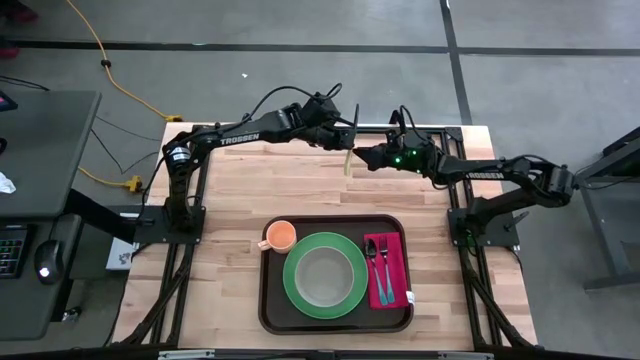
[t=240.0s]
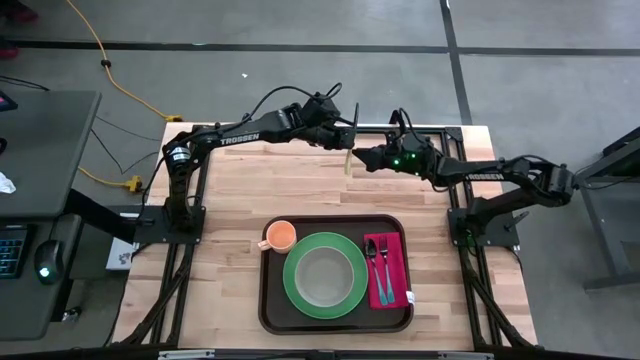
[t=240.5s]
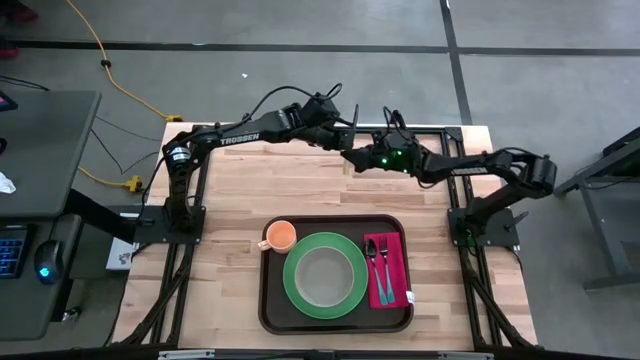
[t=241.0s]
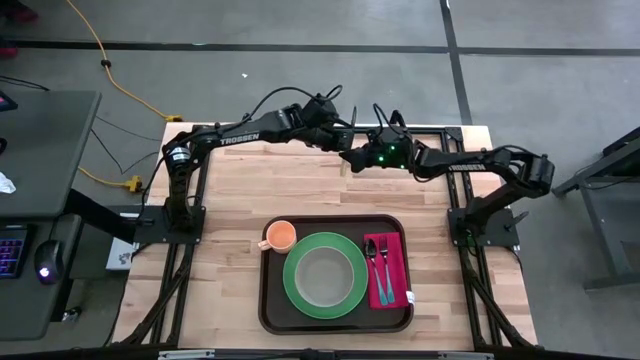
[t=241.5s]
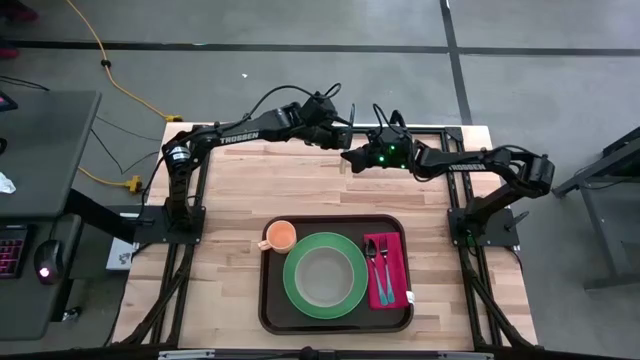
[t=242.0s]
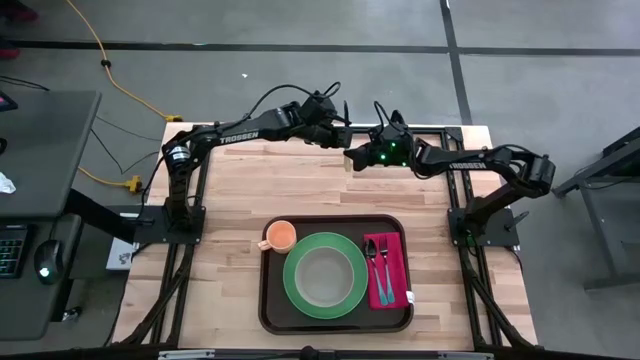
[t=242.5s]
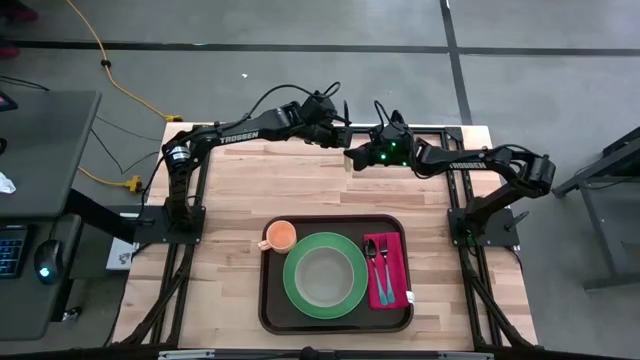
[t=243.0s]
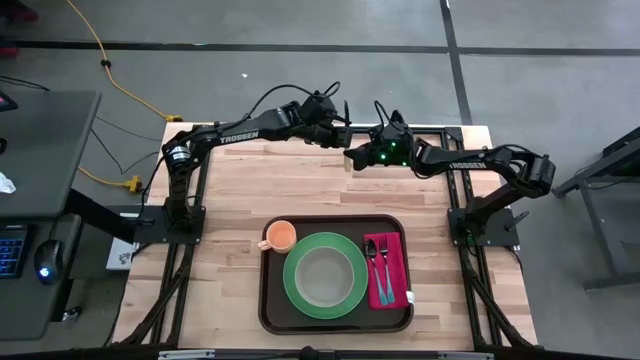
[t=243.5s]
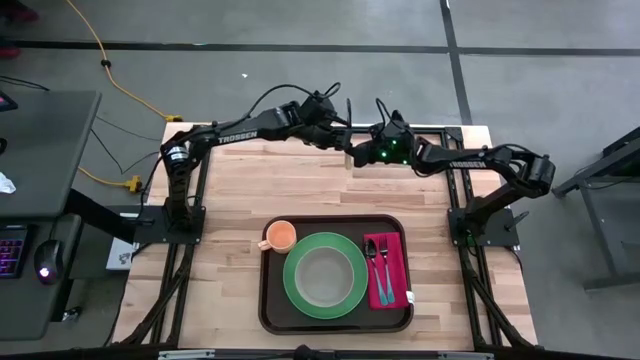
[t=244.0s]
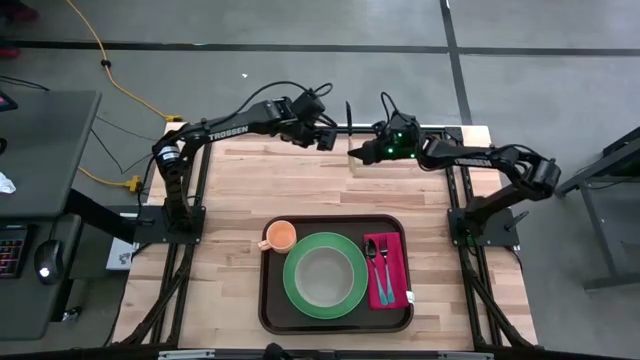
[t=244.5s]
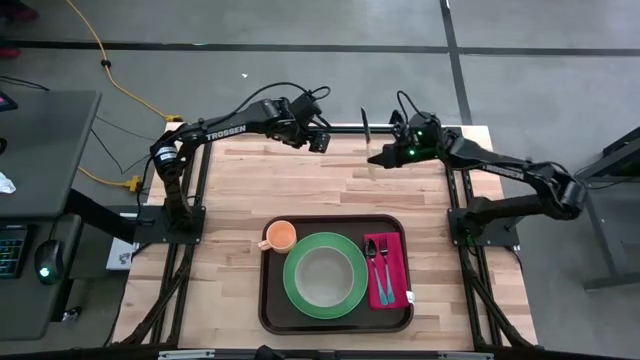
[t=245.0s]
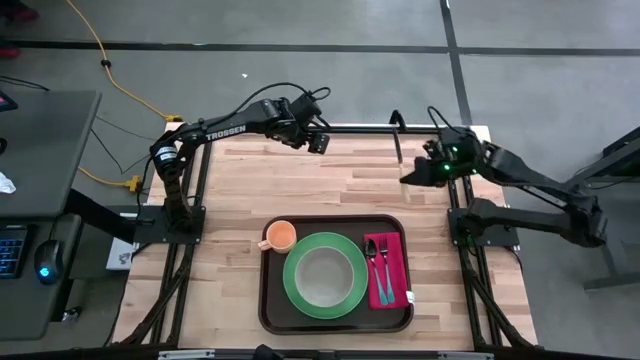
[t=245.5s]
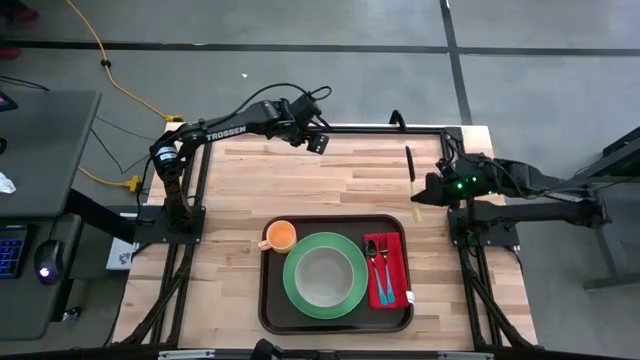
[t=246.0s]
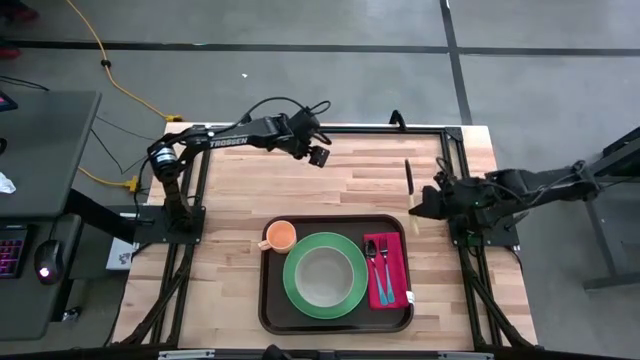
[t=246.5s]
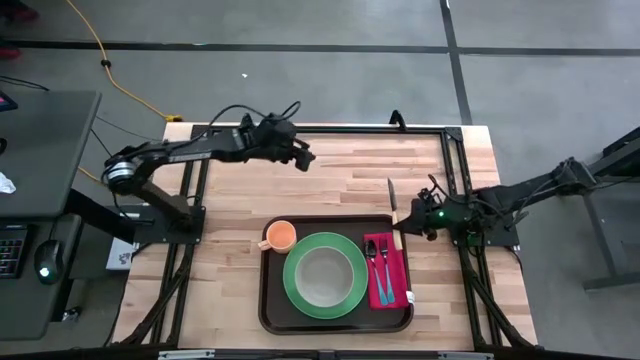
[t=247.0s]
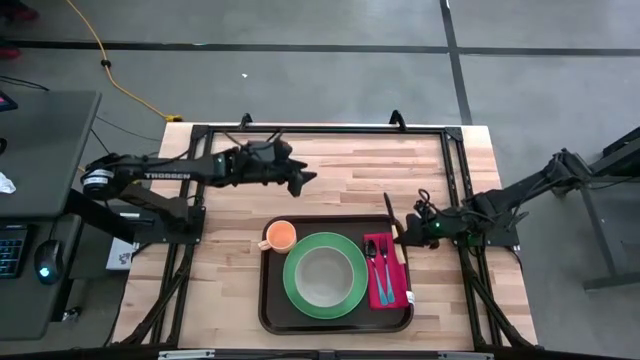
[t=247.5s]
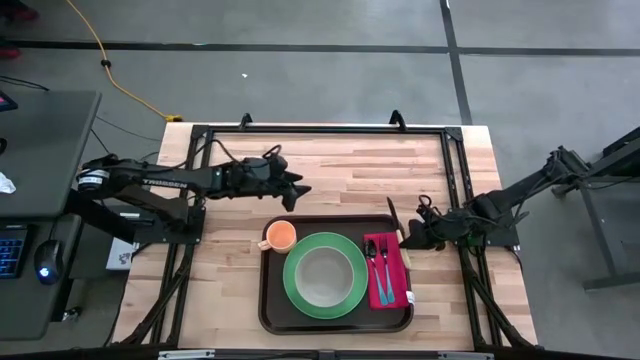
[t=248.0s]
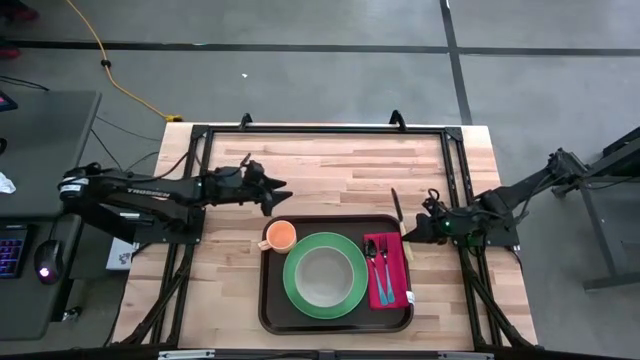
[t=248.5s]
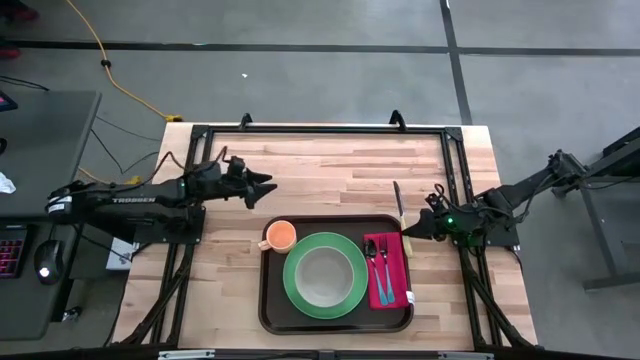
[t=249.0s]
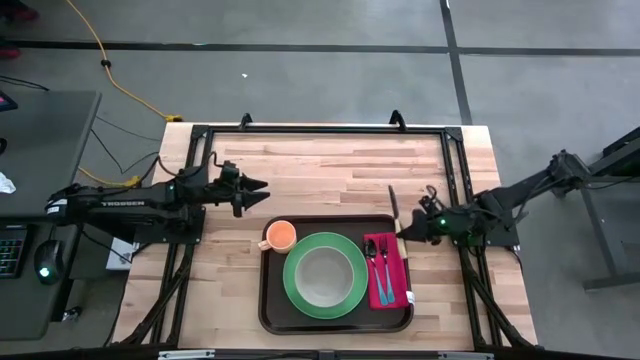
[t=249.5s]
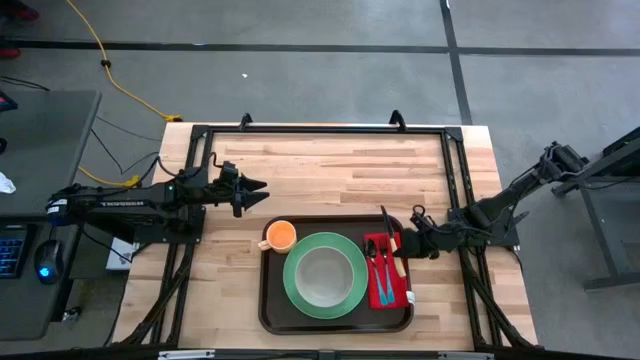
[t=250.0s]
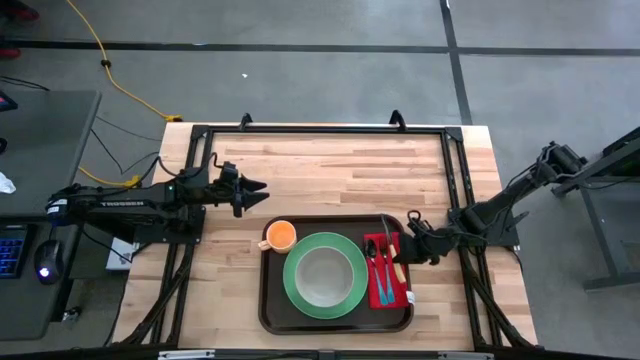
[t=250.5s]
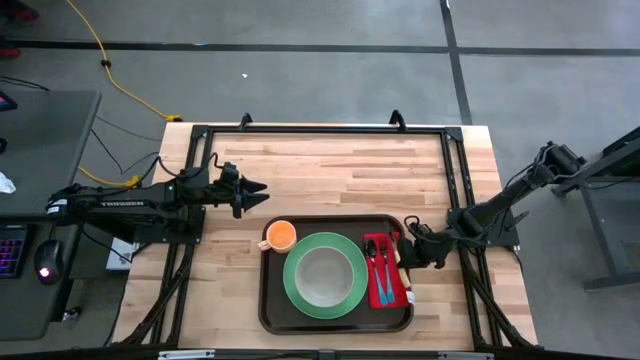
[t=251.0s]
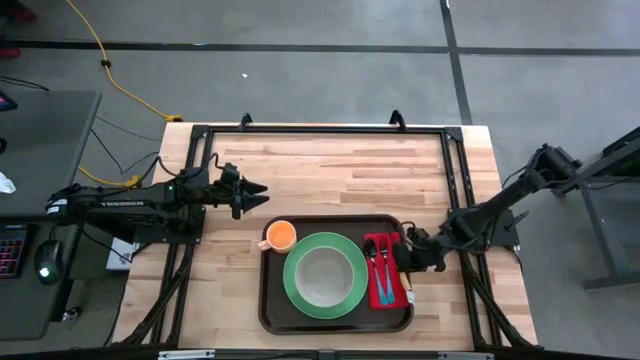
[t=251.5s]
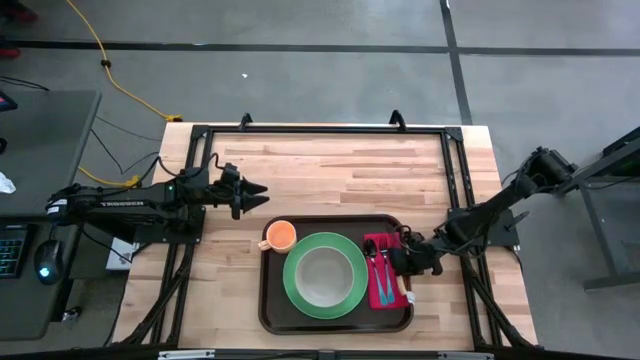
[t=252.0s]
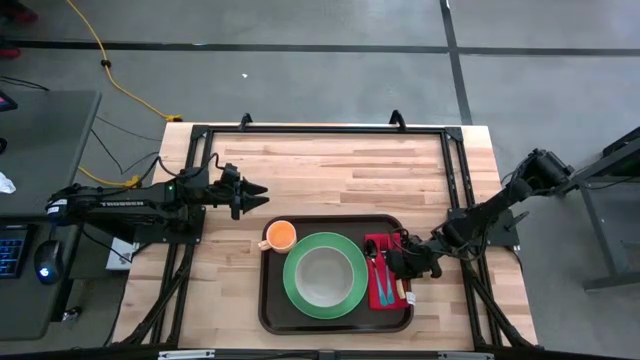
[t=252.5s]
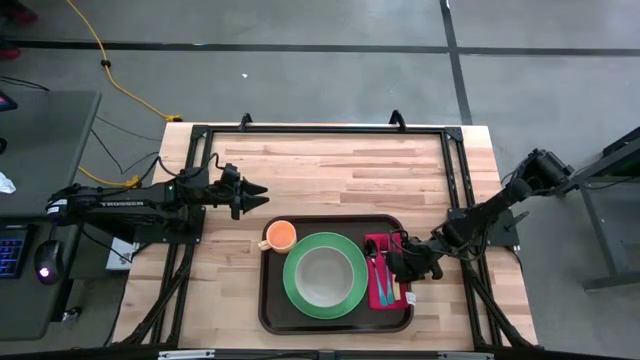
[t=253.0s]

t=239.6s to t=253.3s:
Task: Set up tray
Put the yellow table knife on top of the red napkin to the right of the blue fork on the black tray

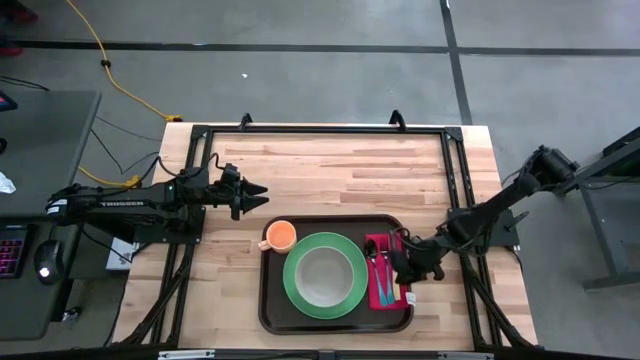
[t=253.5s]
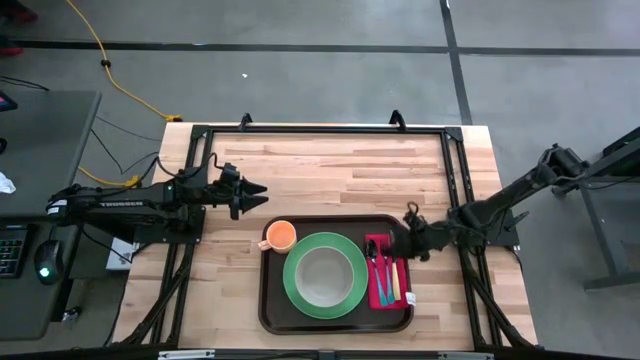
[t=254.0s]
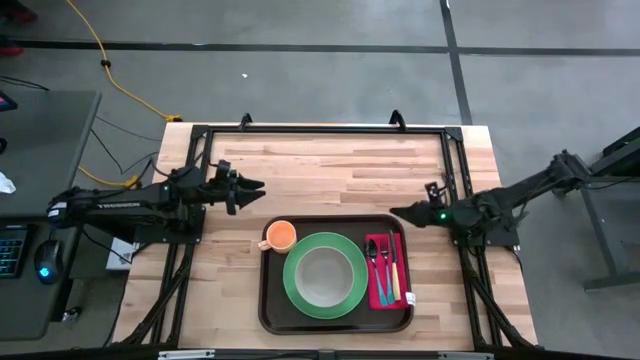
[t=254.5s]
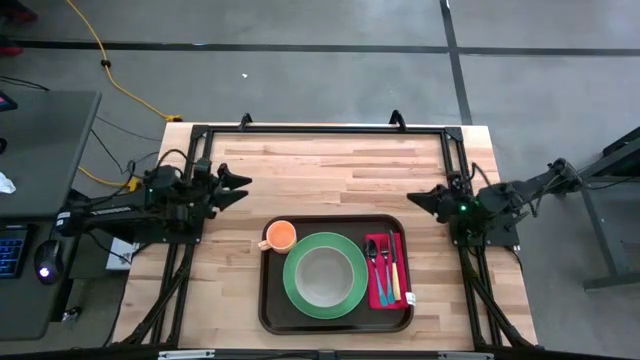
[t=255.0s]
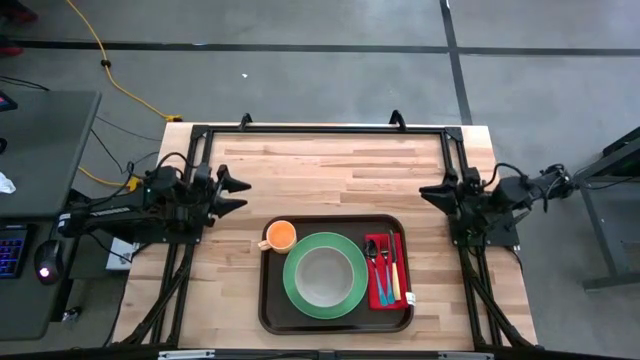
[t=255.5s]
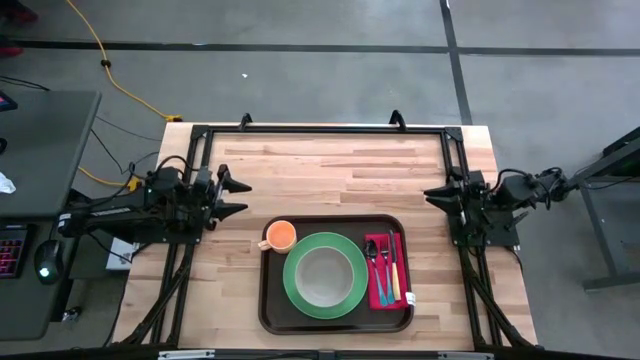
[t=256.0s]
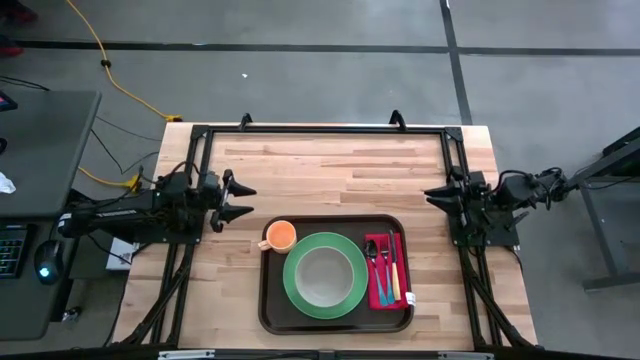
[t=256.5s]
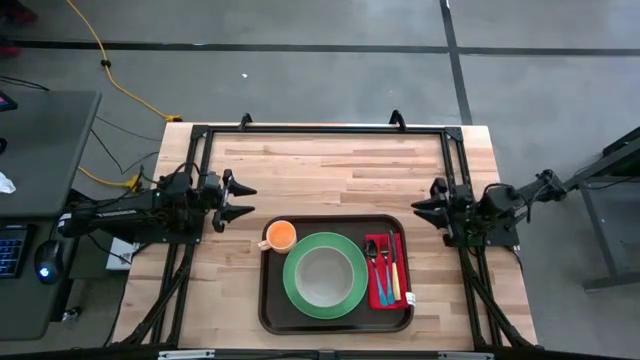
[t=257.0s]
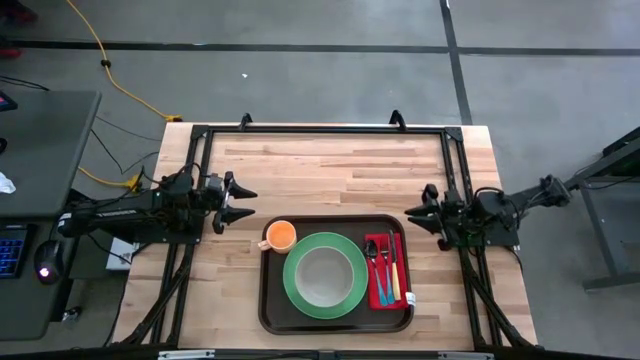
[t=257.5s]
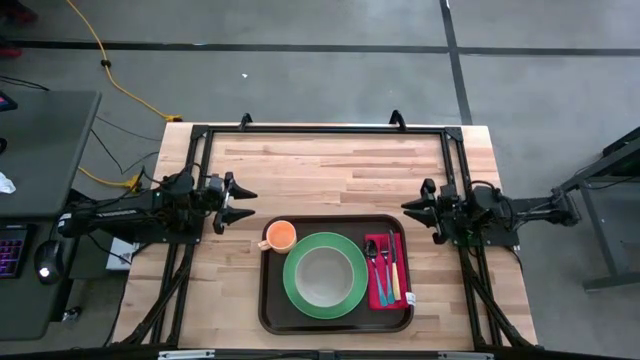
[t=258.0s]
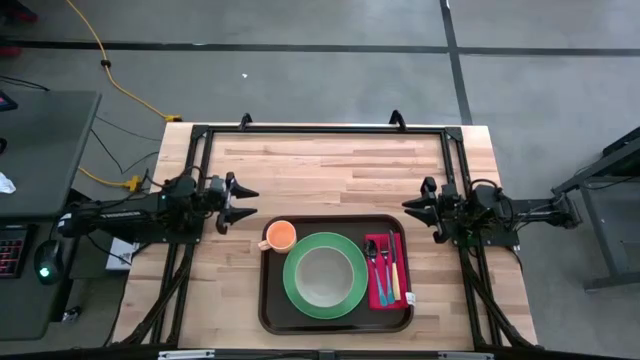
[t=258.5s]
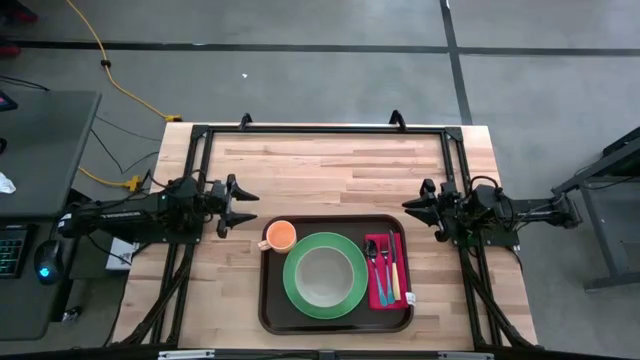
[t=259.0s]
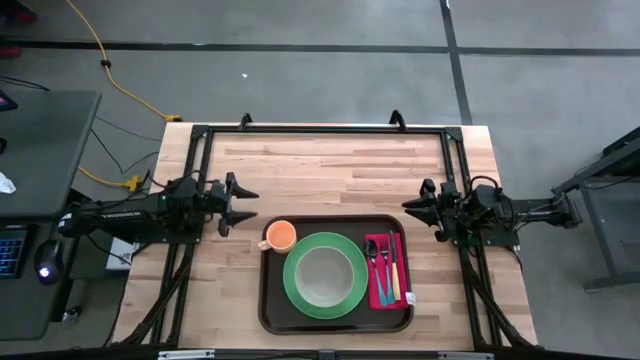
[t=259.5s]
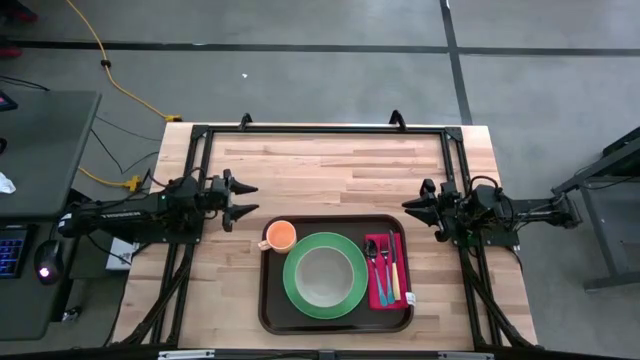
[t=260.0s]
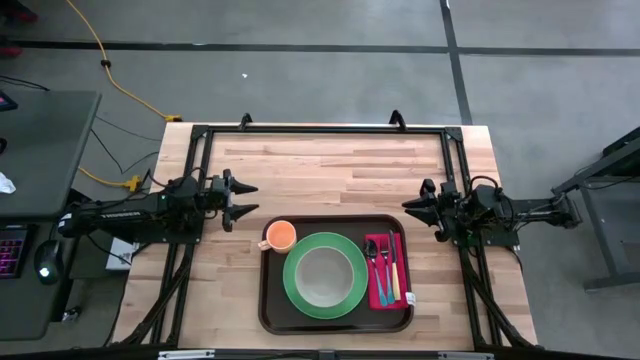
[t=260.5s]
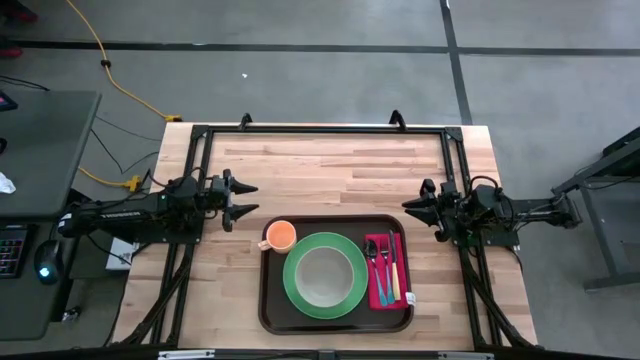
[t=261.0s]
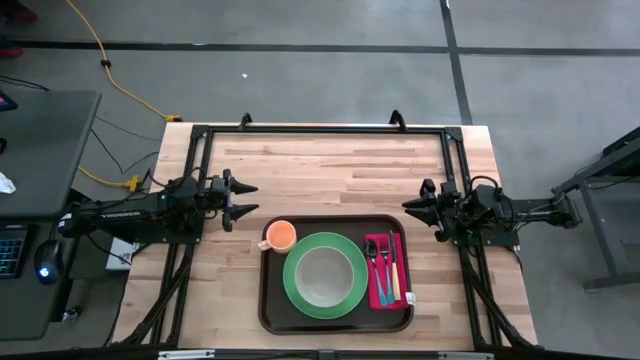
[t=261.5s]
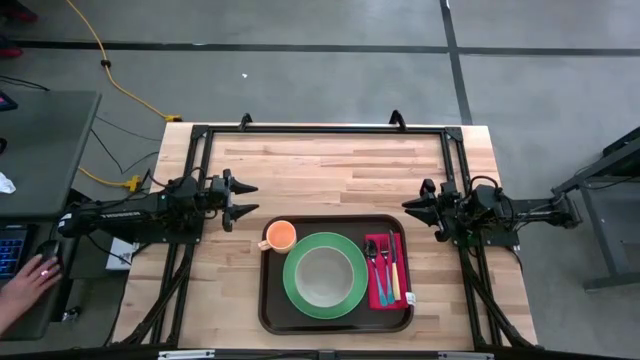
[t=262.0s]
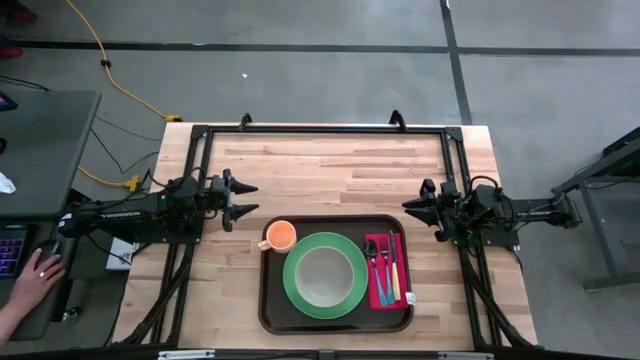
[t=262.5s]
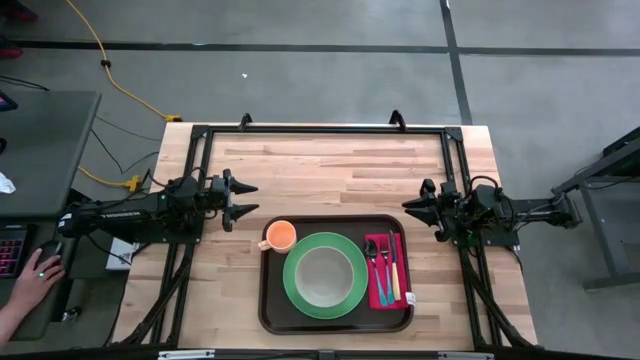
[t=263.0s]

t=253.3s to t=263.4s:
Return to Home Position
